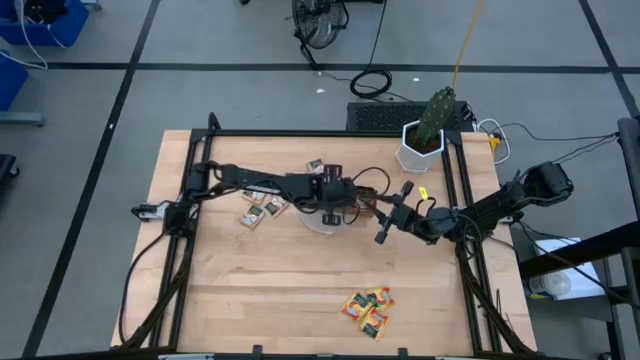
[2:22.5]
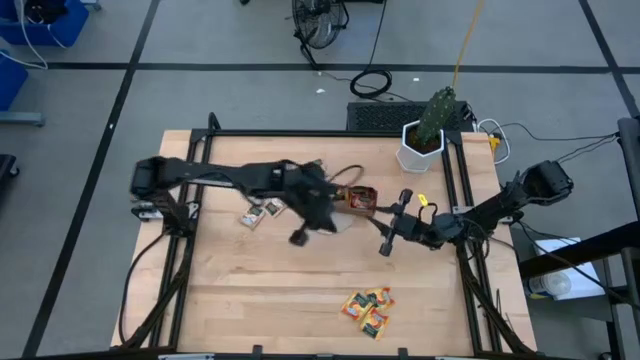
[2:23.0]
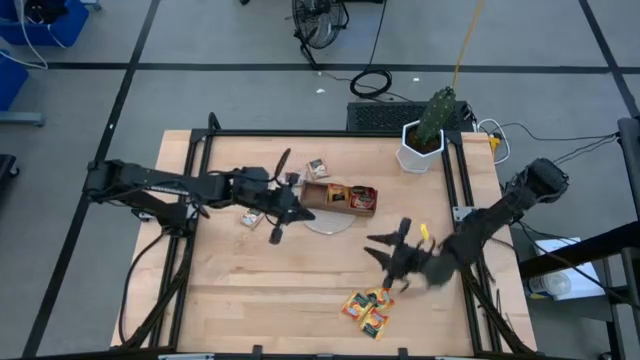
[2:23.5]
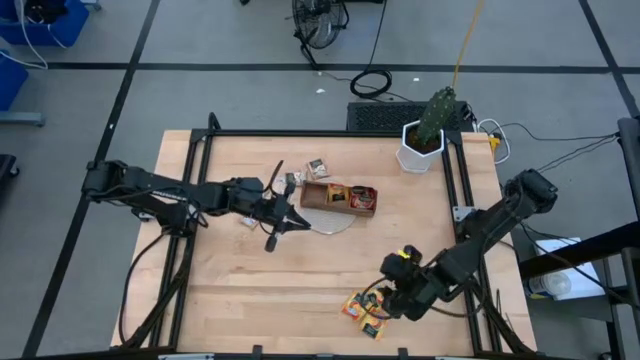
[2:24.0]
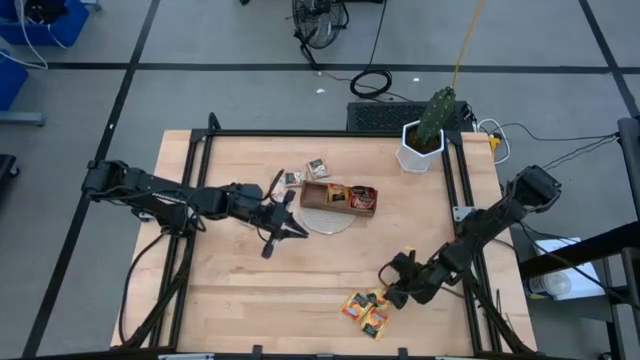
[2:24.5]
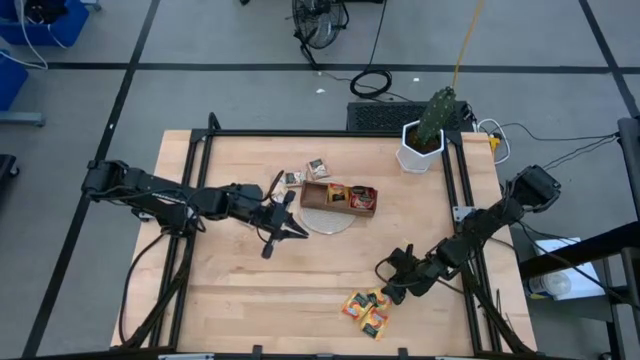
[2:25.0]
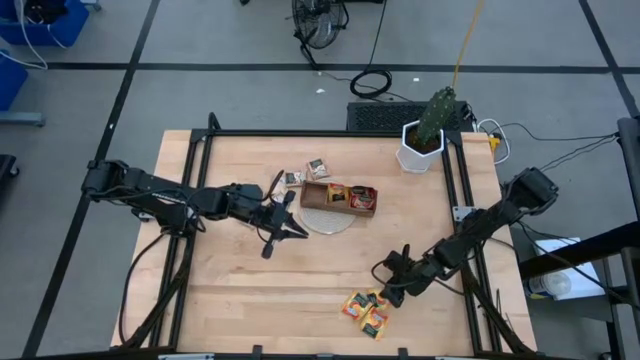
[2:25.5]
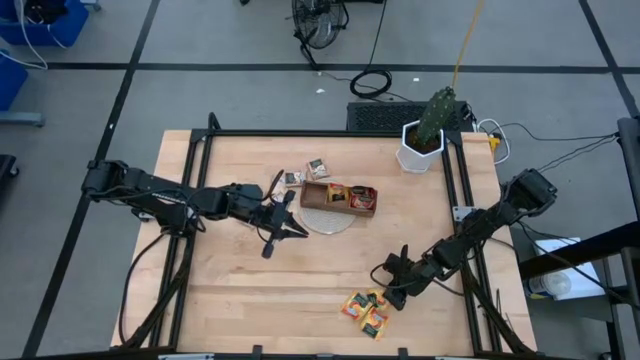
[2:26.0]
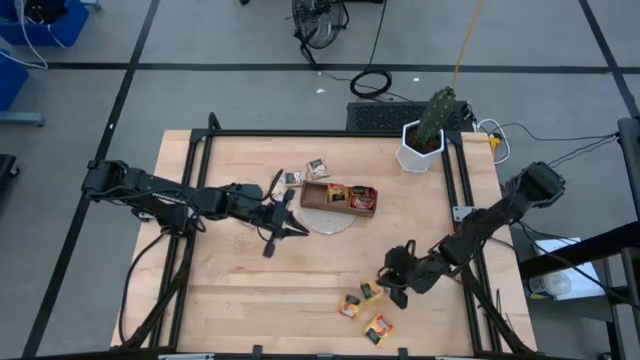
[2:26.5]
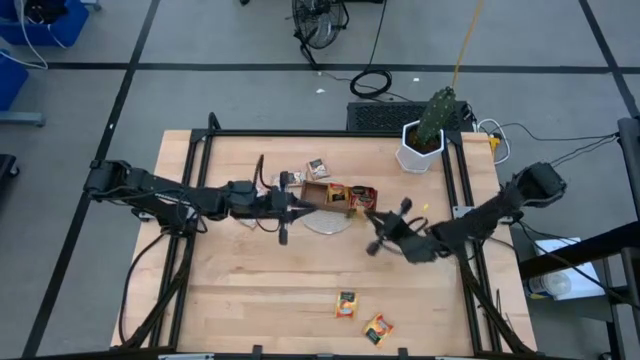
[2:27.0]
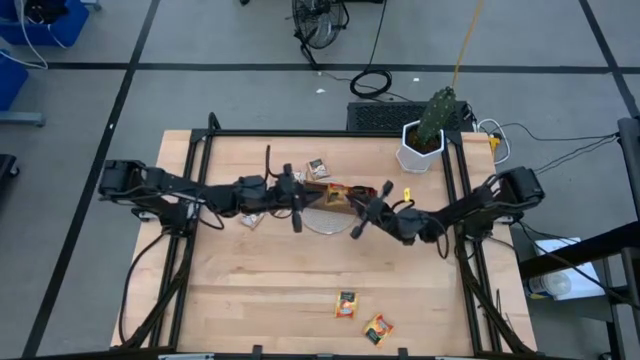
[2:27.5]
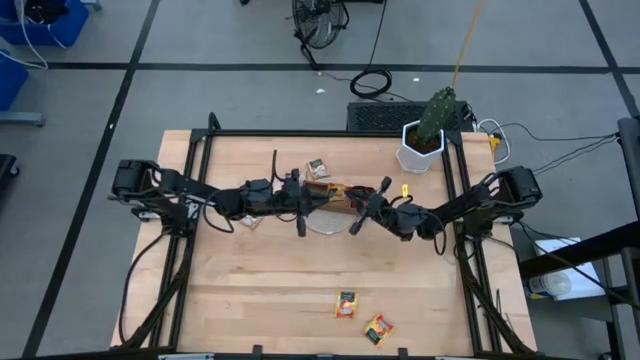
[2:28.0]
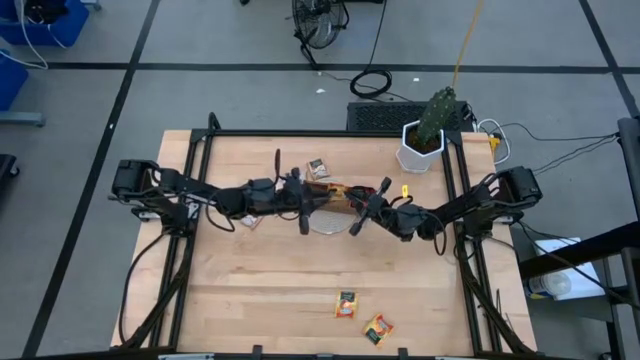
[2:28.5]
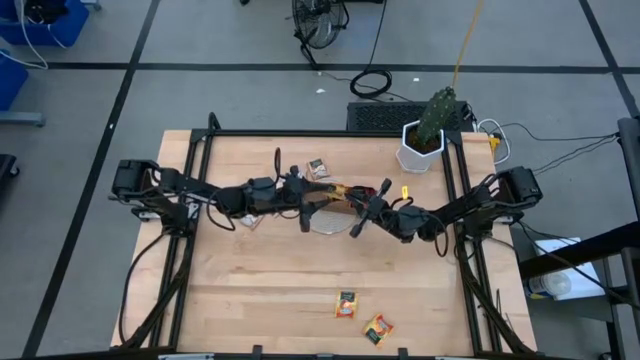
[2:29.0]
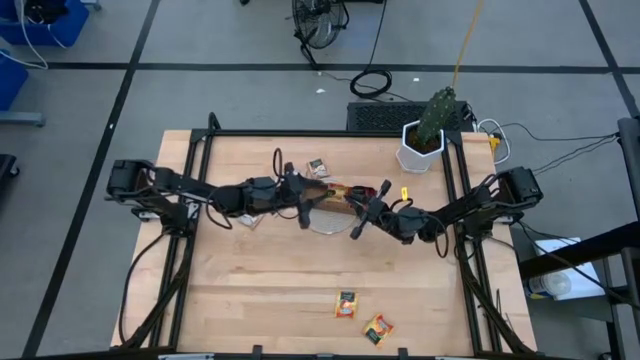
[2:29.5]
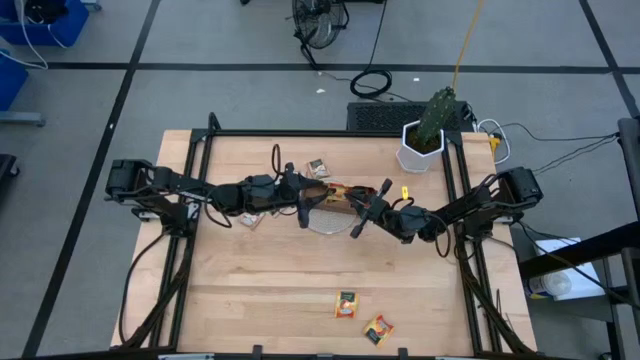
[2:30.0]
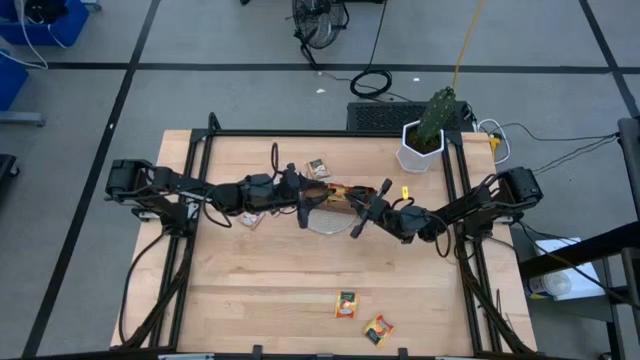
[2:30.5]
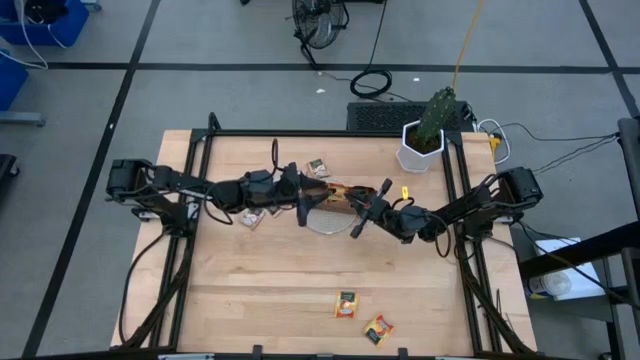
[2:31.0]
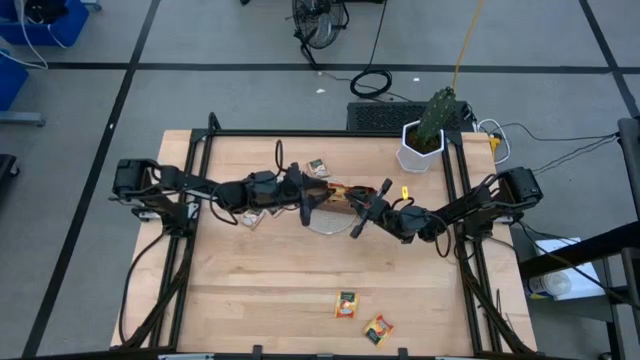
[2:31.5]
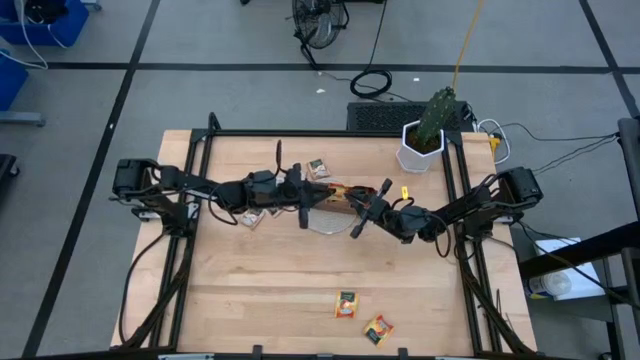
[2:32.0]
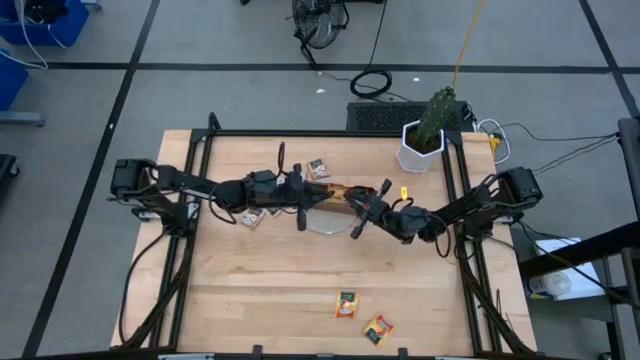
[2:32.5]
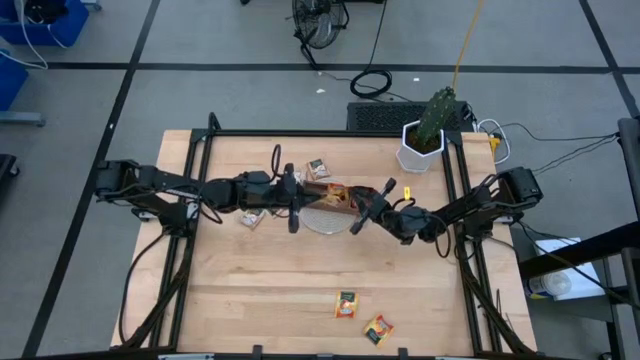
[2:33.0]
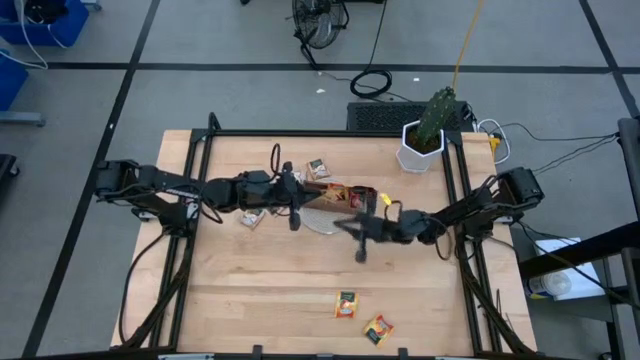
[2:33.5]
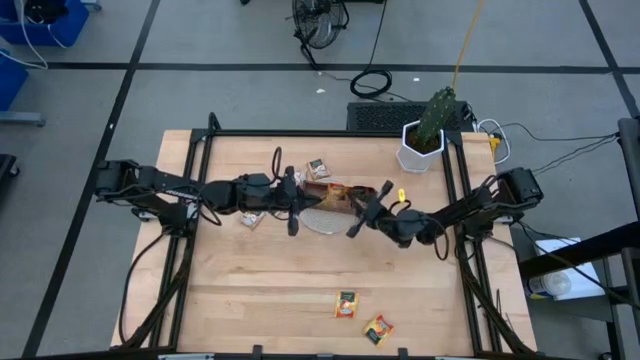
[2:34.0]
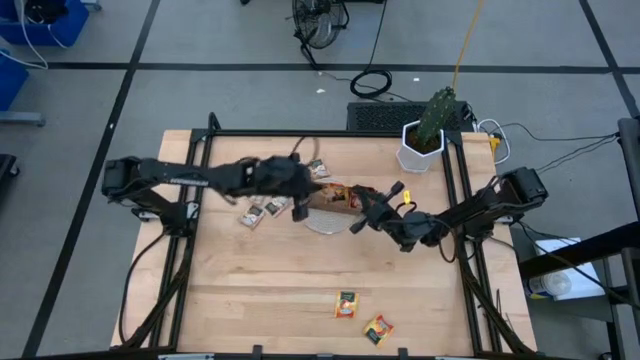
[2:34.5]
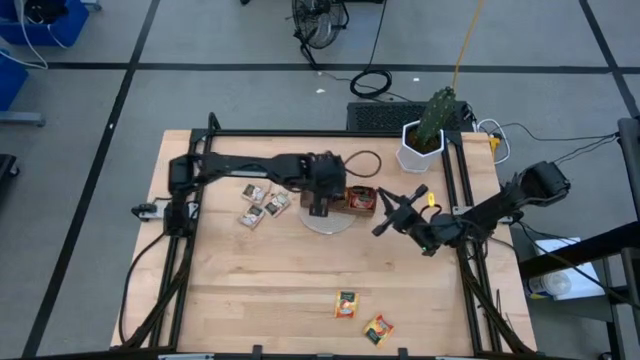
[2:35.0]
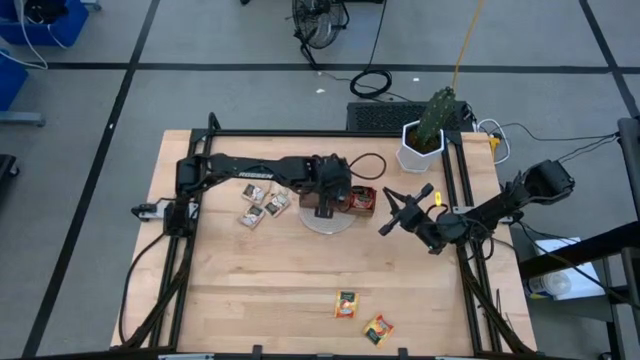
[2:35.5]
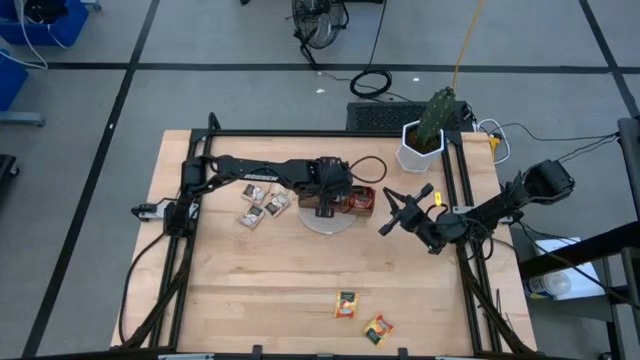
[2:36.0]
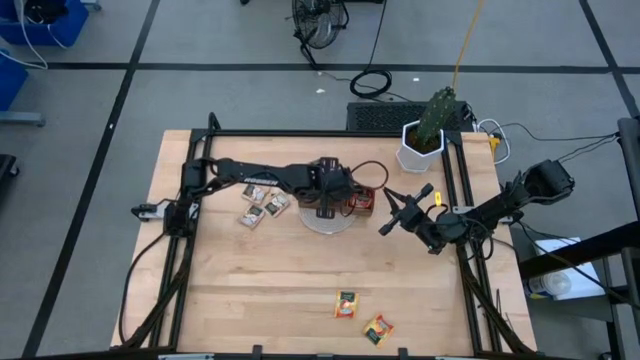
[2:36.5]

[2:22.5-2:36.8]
Task: Pick & Place Tea
Put the orange tea bag into the middle section of the wood organizer

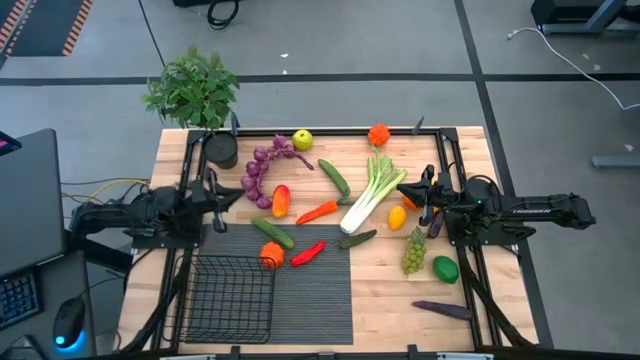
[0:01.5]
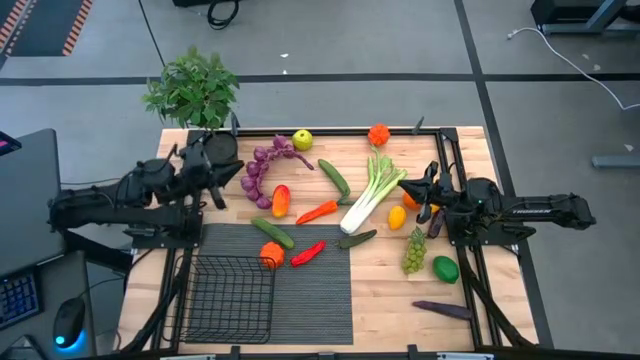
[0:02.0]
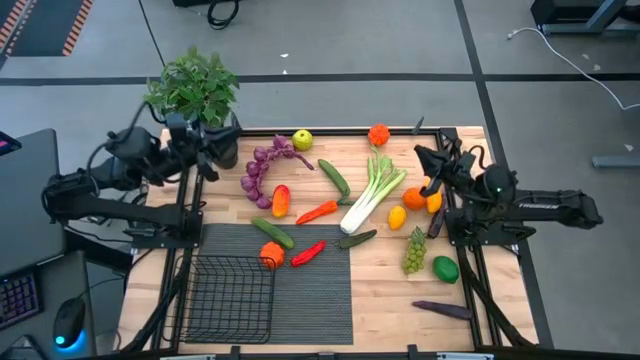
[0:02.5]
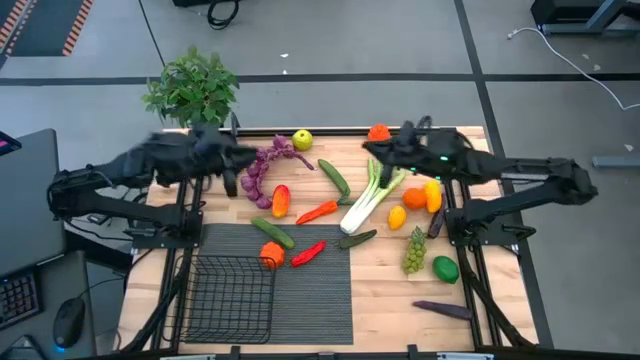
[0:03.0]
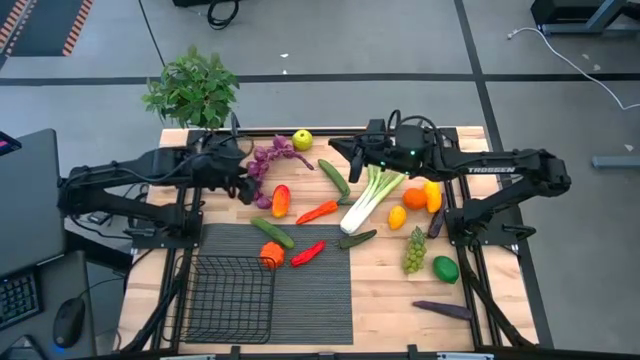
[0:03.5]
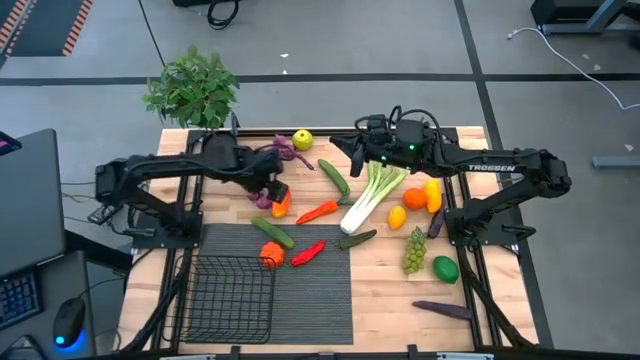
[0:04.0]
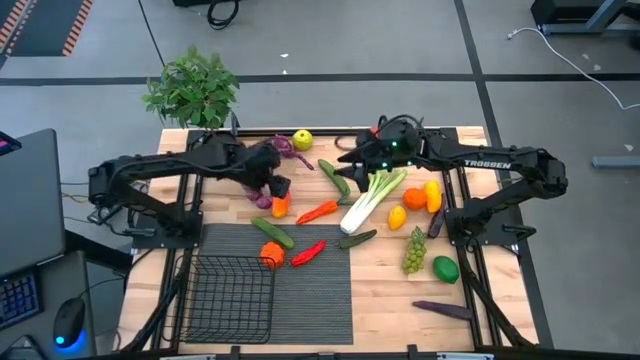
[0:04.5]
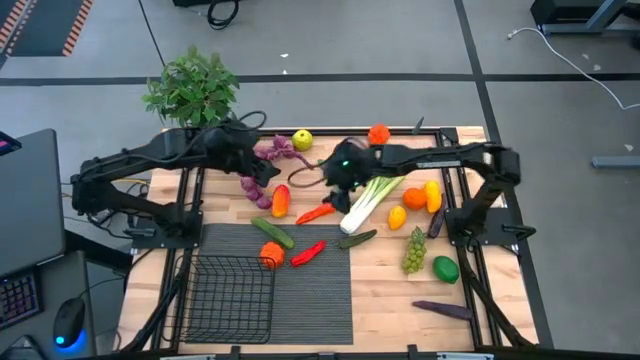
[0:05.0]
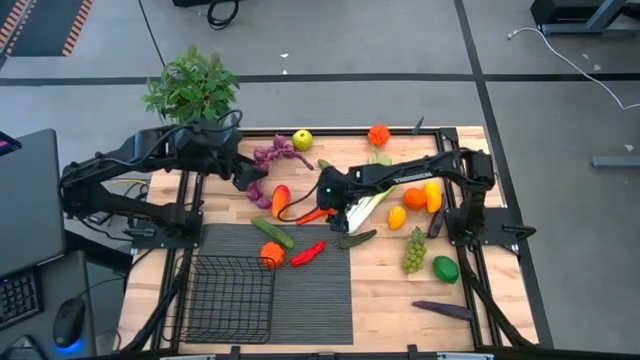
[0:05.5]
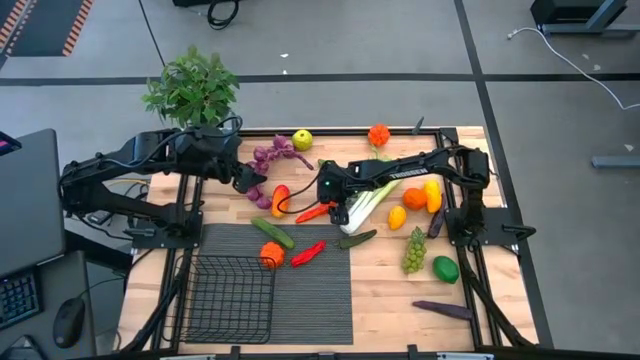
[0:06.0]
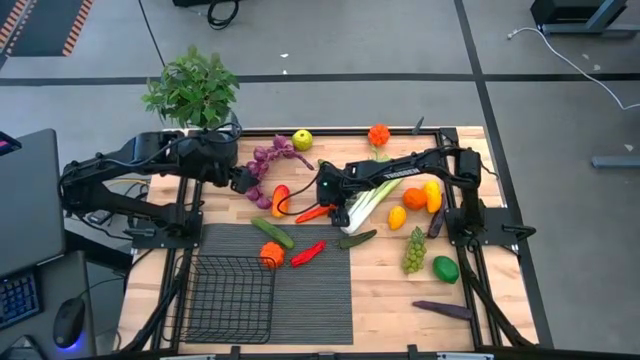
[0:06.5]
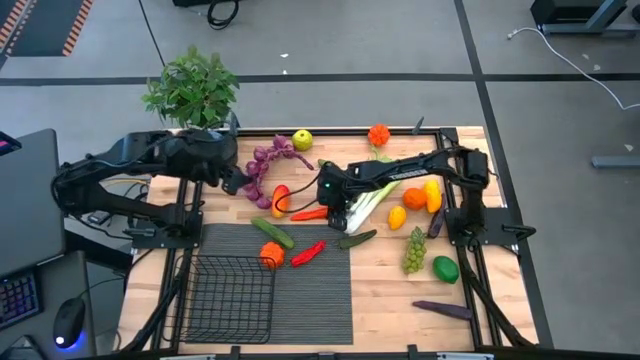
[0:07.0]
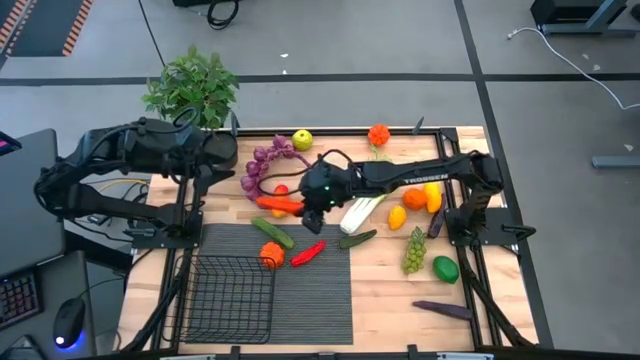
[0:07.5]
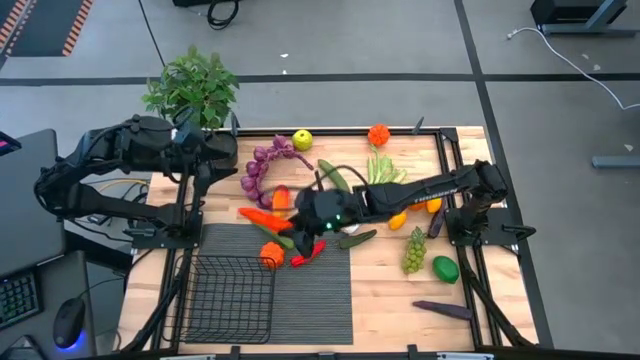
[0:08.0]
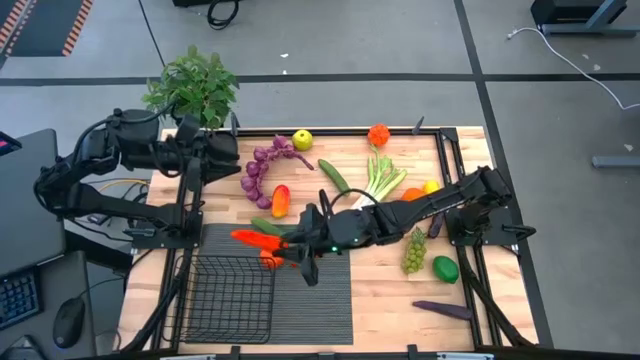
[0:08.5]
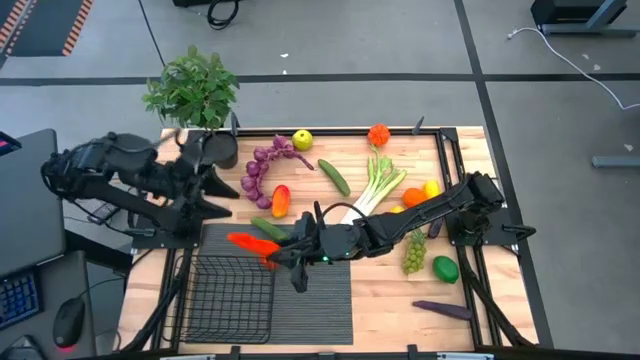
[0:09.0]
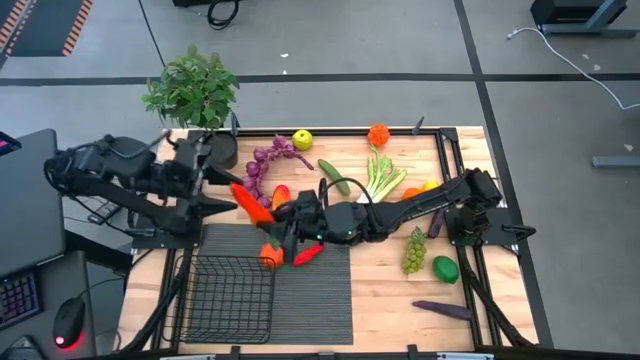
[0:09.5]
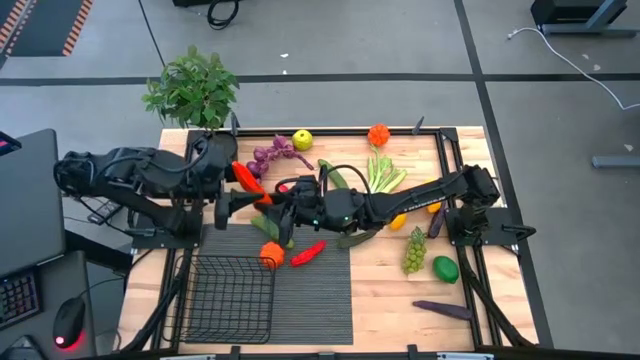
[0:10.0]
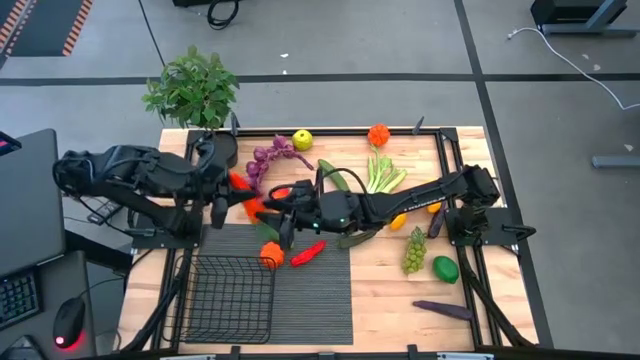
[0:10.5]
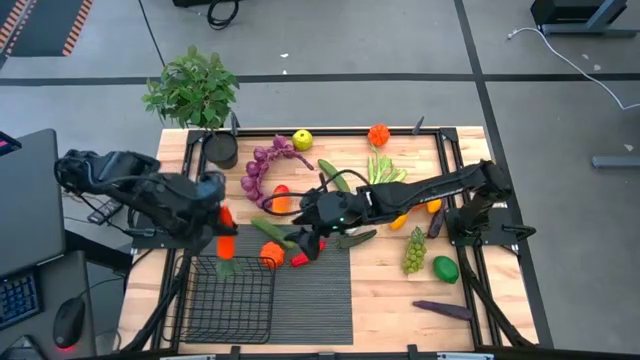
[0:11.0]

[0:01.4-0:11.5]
Task: Build produce basket
Put the orange carrot into the wire basket
